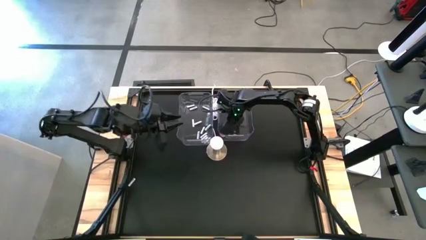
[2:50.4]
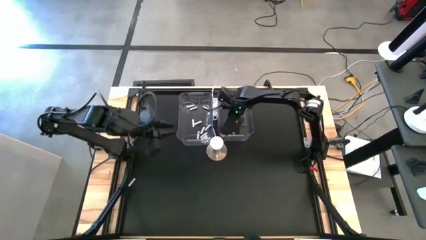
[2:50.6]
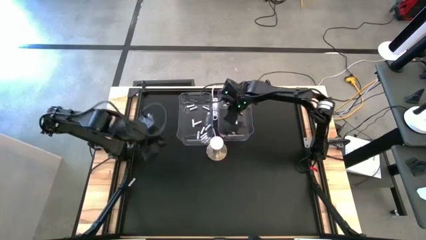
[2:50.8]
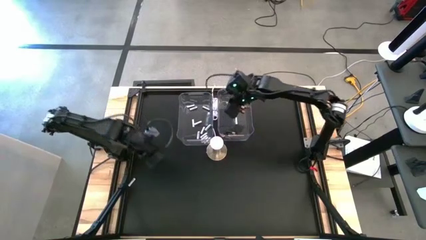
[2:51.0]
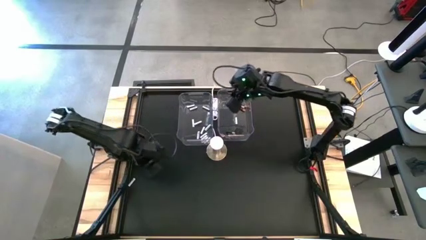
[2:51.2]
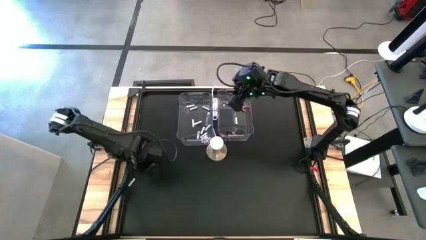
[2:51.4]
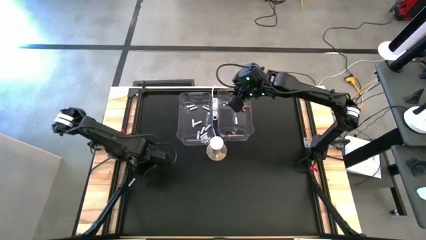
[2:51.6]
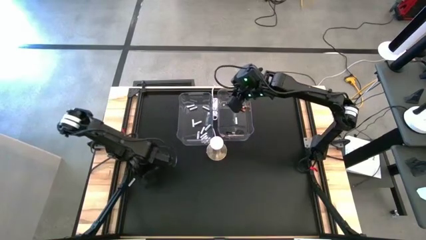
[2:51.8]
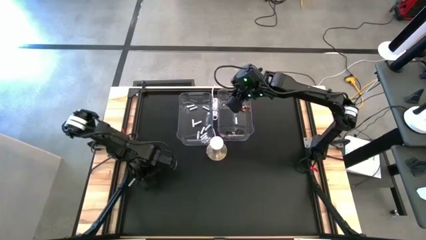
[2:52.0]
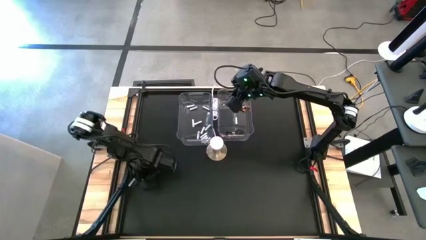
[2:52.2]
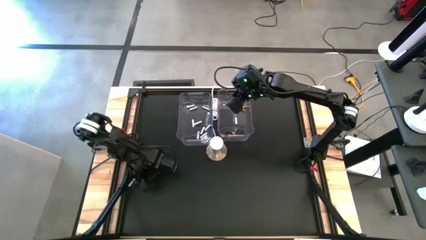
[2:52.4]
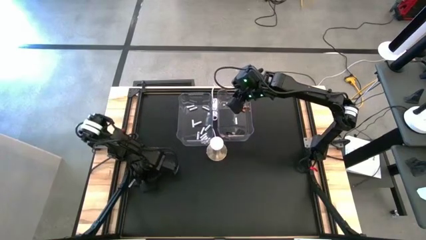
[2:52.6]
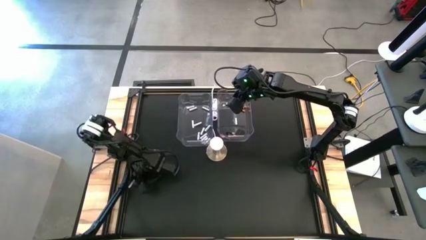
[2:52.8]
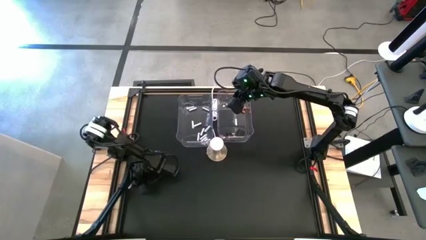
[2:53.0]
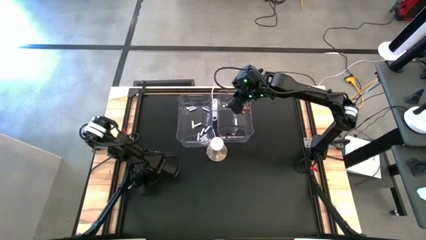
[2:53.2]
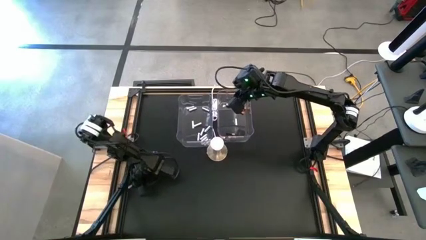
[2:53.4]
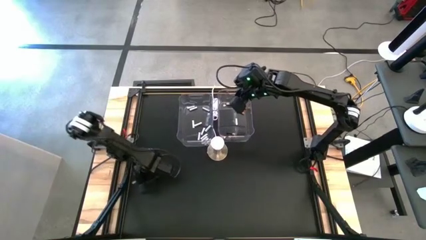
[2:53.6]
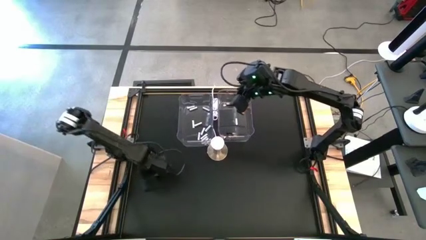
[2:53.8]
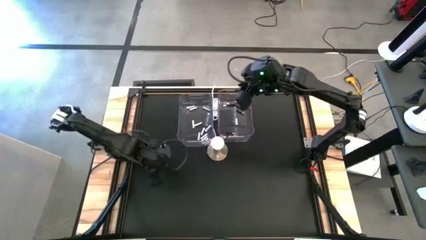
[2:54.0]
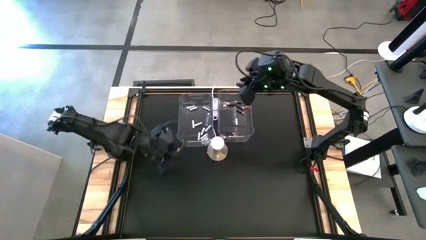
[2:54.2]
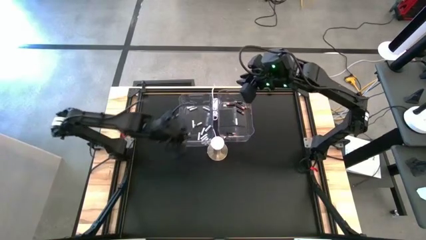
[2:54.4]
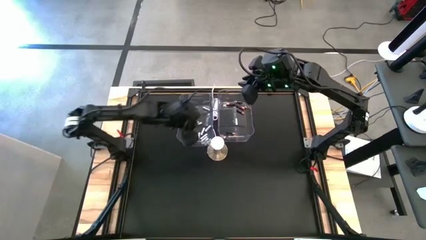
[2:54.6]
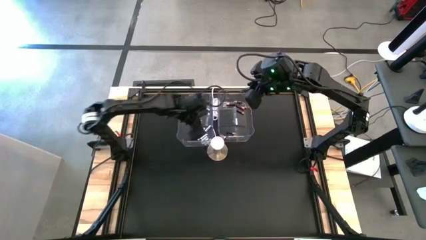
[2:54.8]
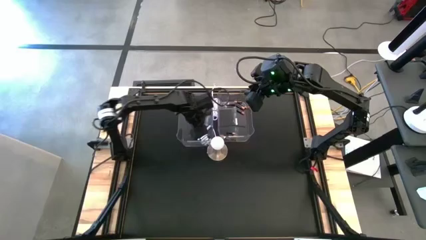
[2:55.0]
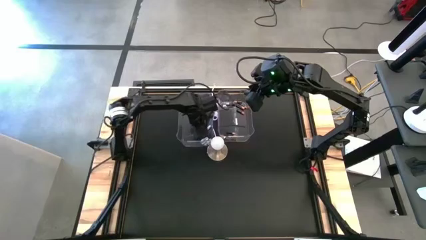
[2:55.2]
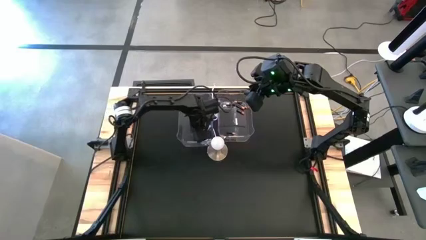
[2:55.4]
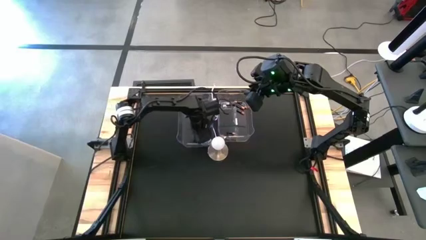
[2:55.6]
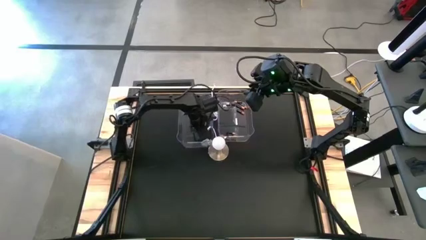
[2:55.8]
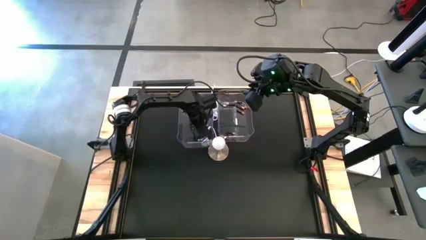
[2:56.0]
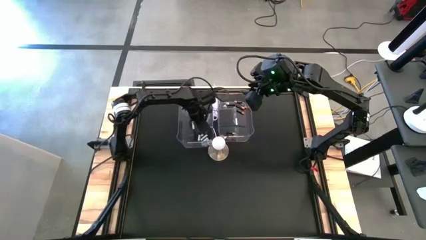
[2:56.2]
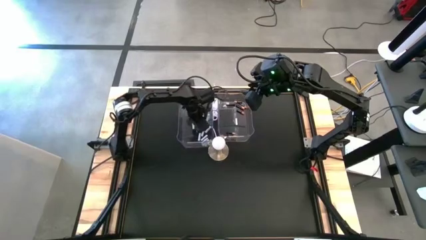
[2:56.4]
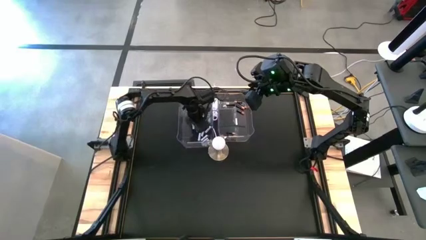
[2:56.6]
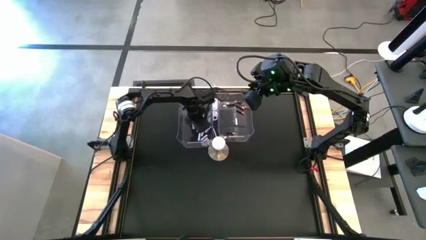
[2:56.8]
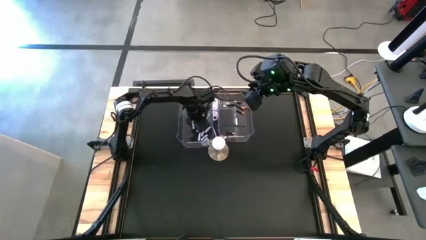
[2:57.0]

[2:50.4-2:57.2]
Task: Sort batteries
Put the white battery into the left transparent bin

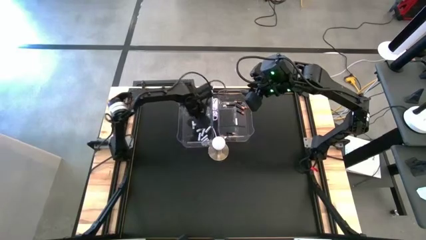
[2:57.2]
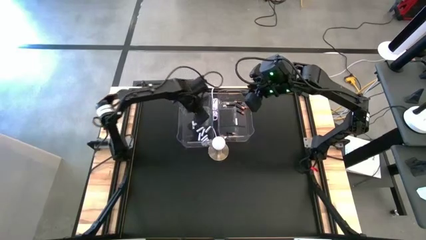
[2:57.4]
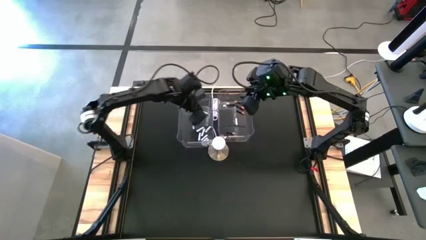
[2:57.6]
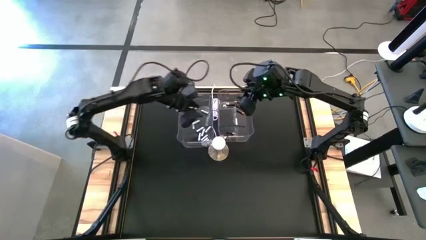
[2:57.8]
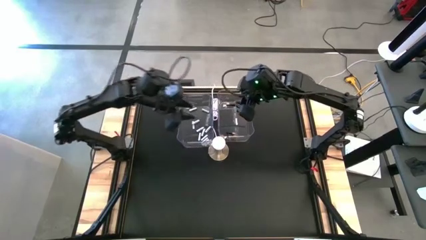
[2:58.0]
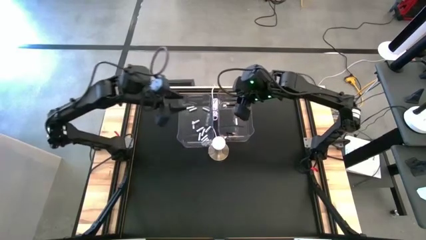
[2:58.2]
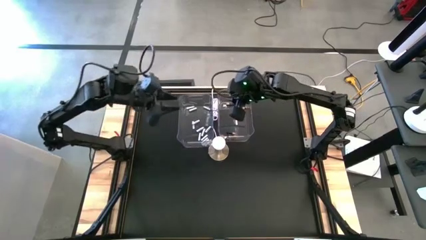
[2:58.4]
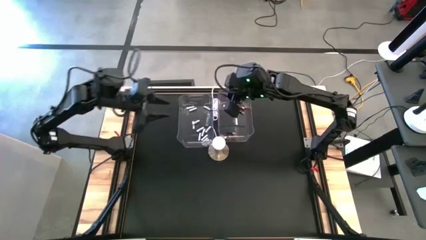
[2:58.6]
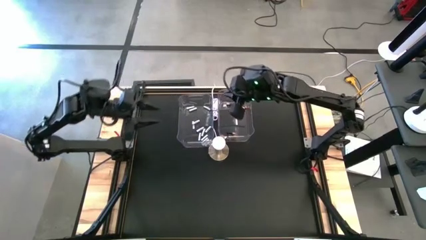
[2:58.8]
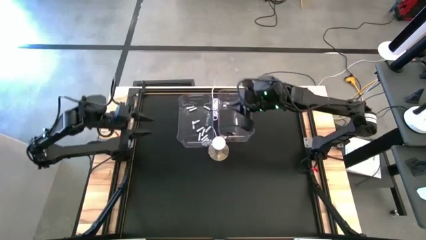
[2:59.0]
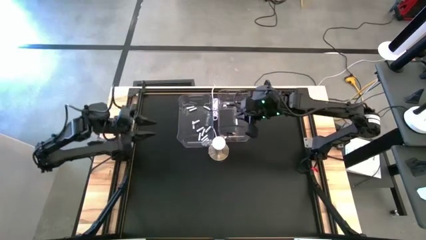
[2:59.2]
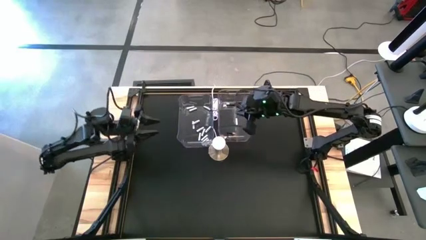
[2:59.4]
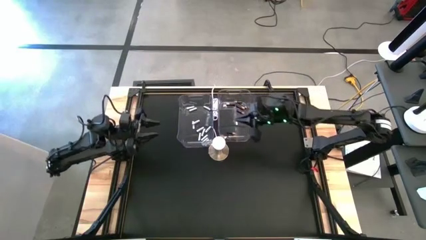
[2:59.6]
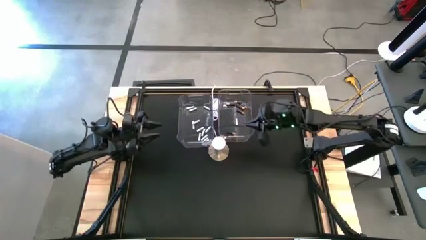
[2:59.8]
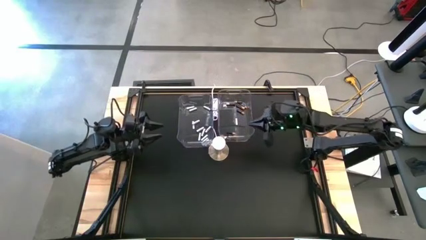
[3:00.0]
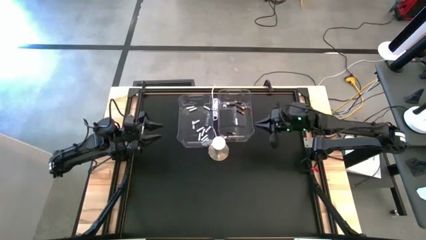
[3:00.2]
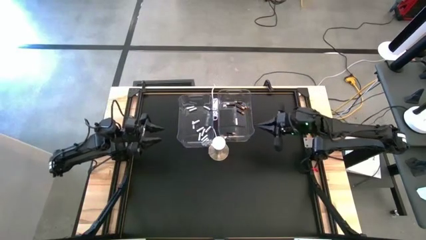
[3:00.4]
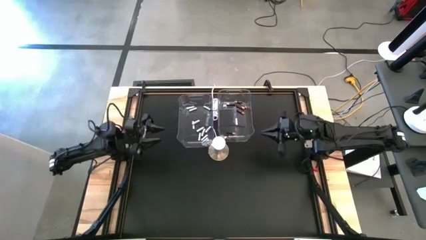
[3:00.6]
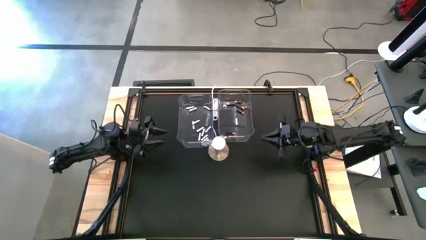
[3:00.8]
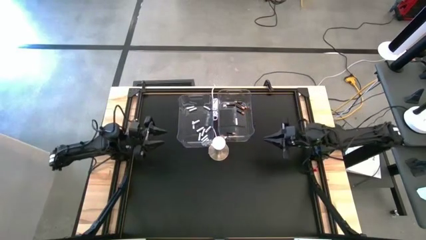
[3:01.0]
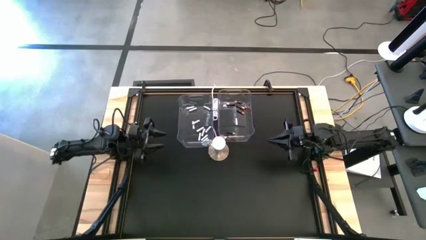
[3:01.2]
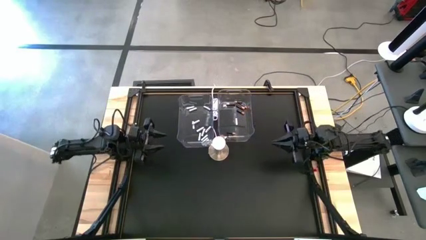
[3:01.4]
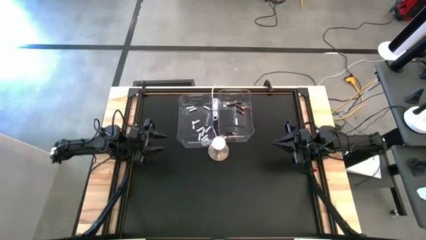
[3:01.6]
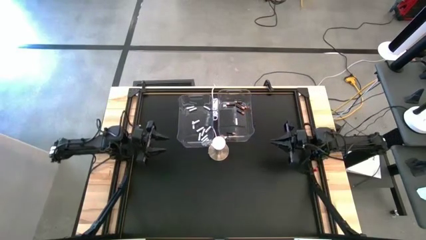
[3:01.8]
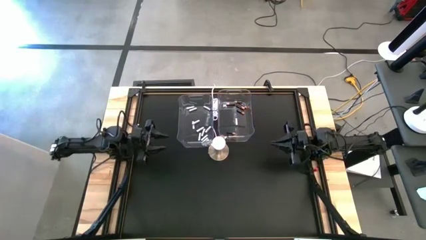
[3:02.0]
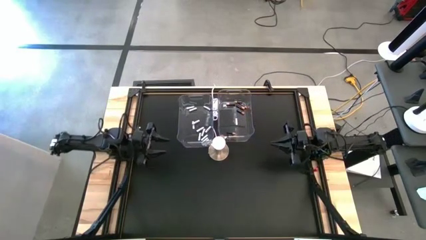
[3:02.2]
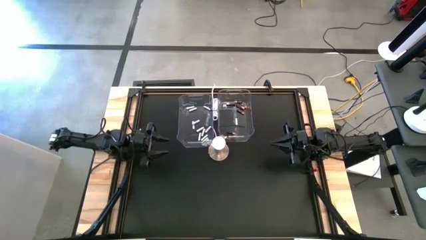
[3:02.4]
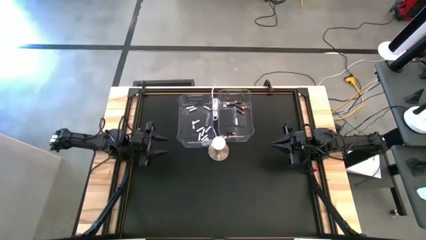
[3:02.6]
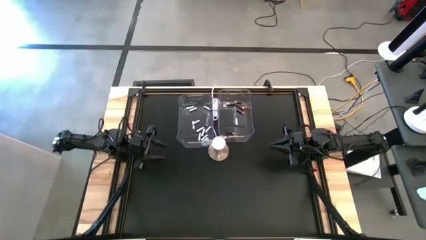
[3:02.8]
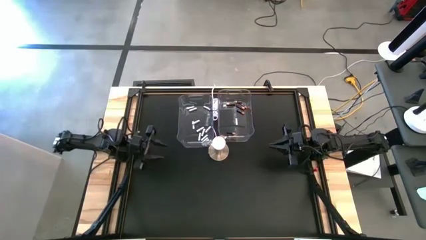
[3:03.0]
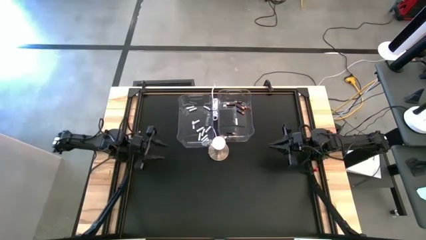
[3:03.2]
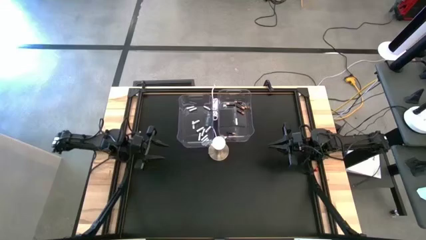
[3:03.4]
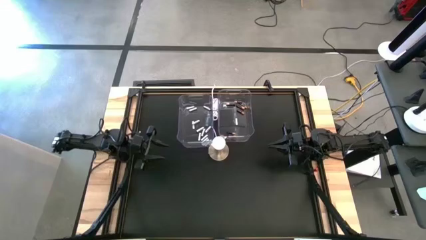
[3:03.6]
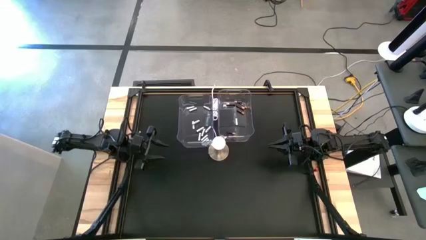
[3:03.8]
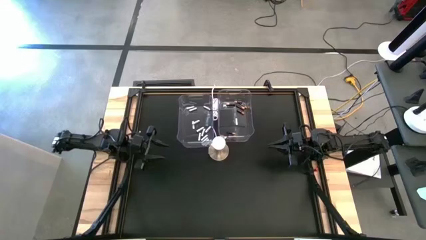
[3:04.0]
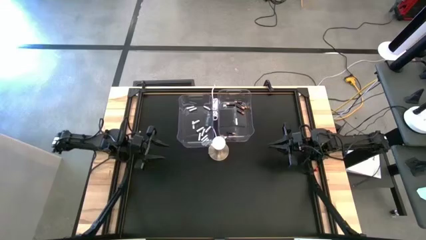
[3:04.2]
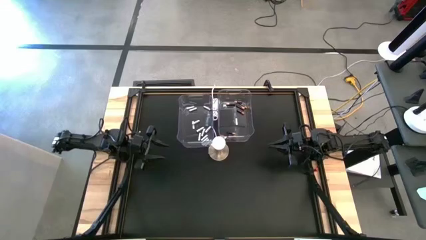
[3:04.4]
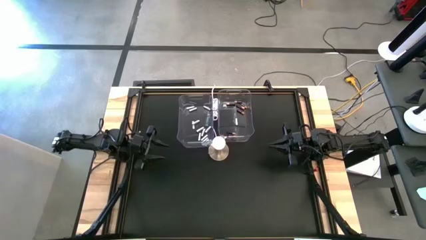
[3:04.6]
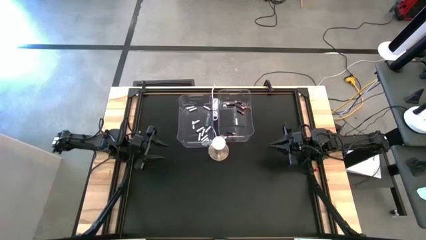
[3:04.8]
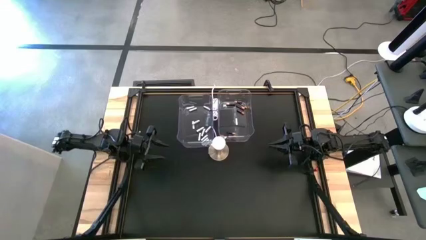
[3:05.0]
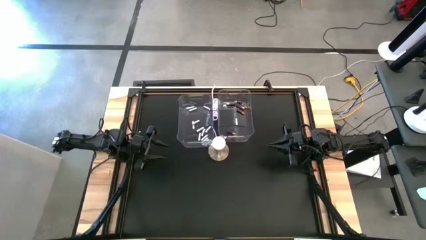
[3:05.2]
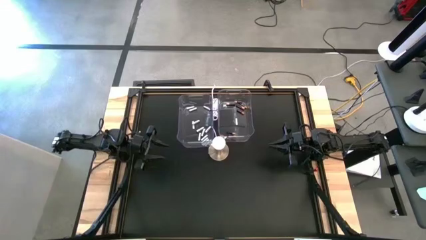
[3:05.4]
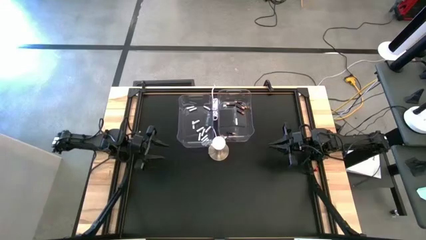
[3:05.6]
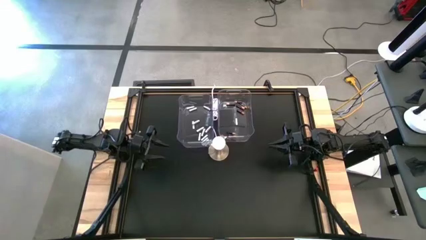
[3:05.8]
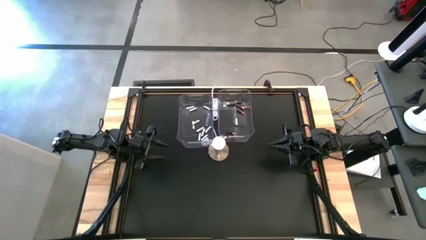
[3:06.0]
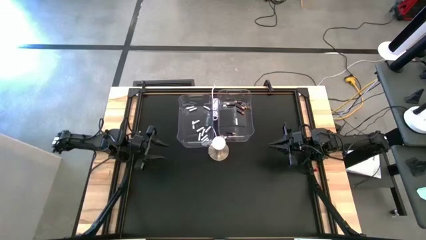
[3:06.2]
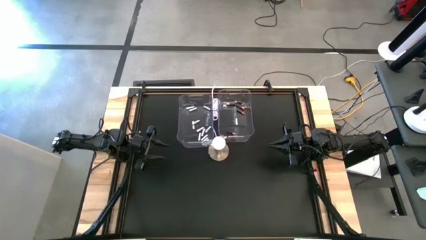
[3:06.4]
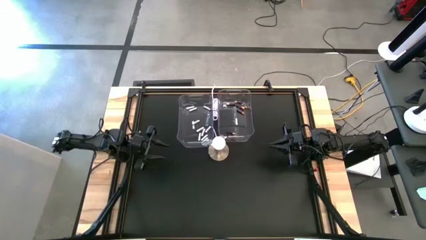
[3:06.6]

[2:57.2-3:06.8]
Return to Home Position
